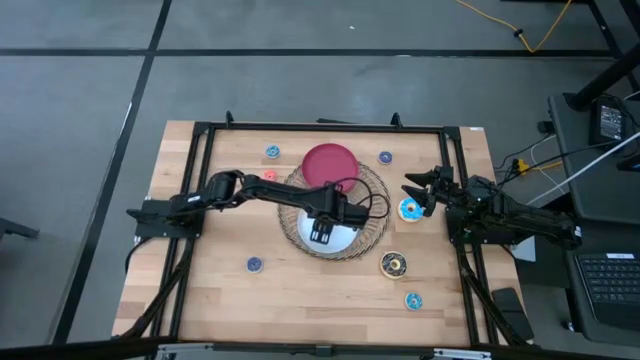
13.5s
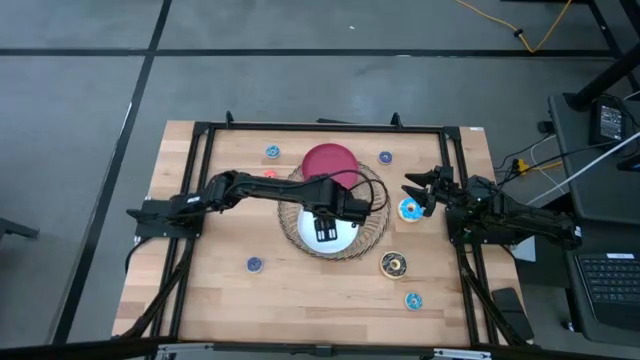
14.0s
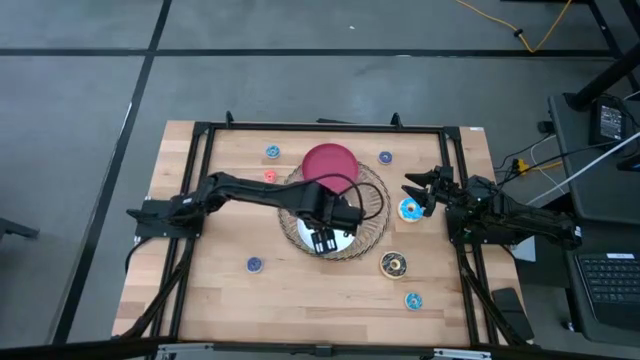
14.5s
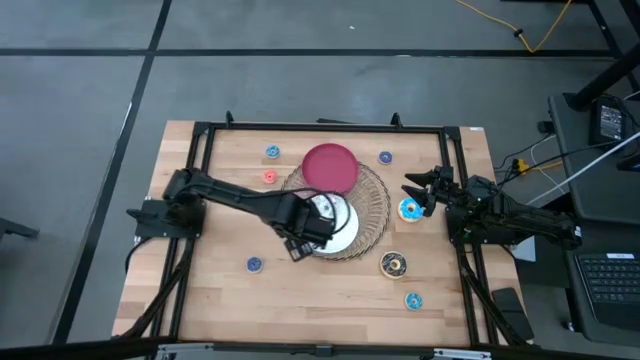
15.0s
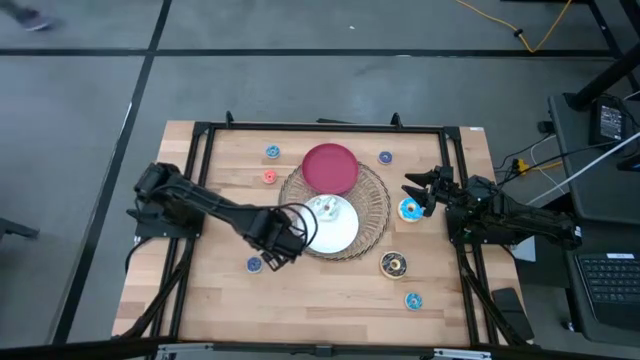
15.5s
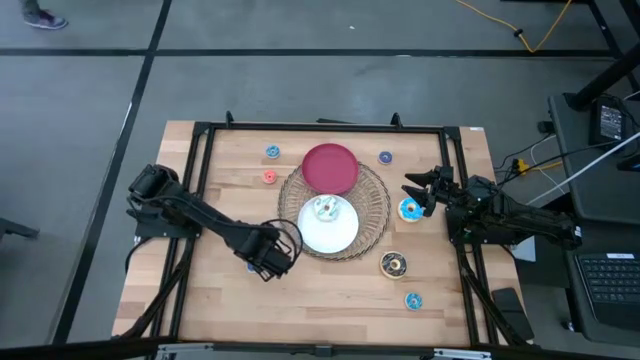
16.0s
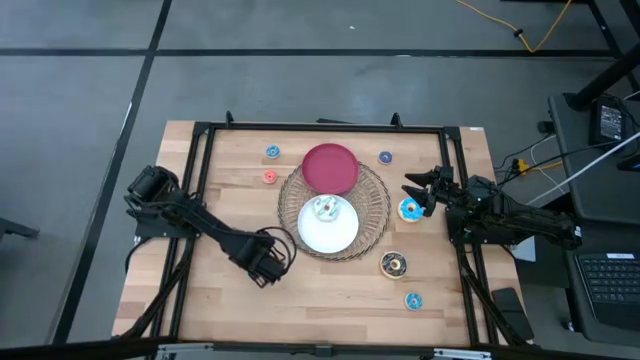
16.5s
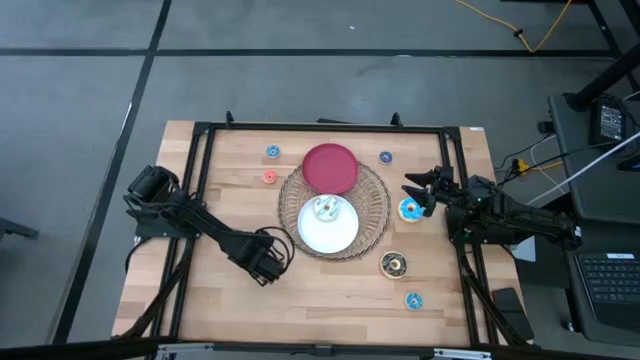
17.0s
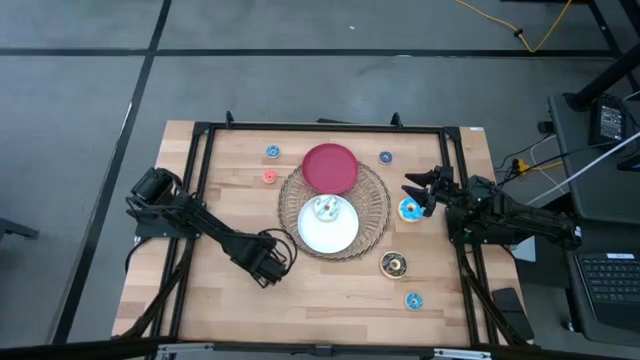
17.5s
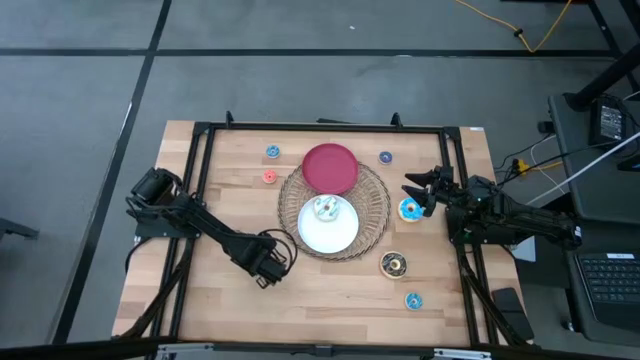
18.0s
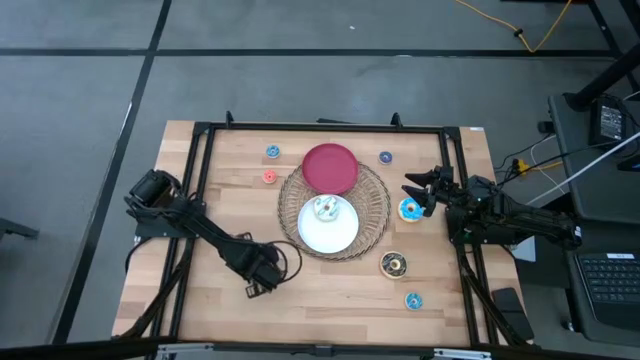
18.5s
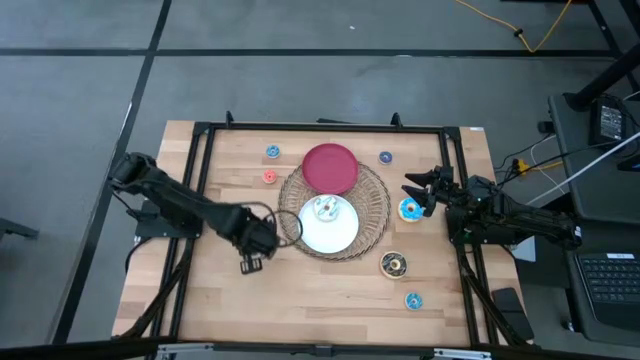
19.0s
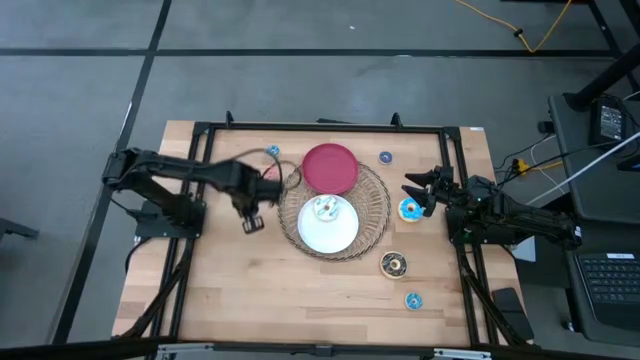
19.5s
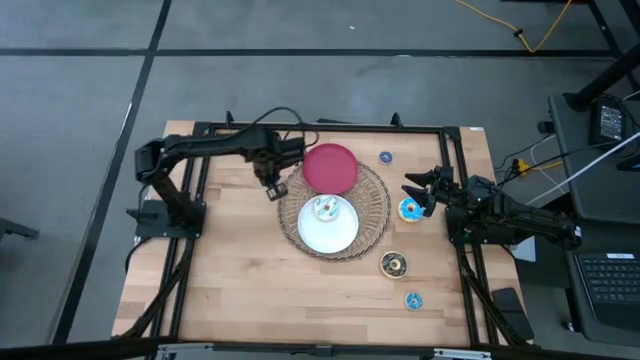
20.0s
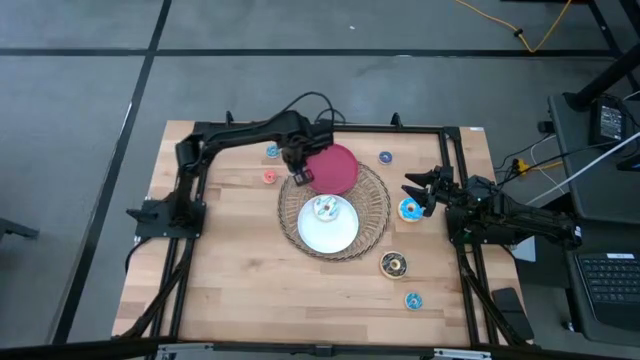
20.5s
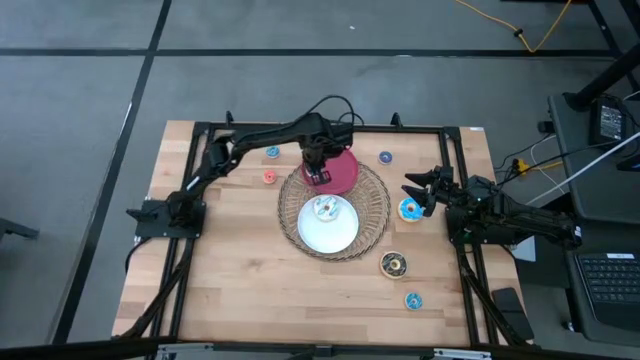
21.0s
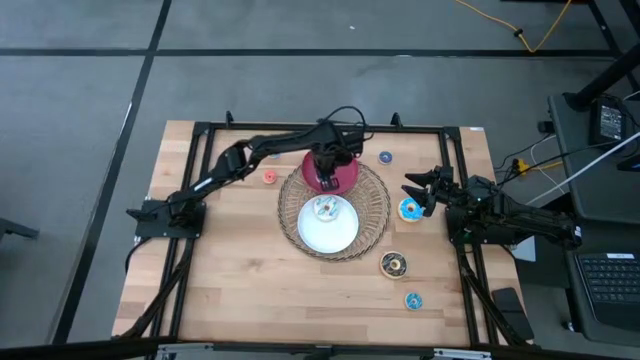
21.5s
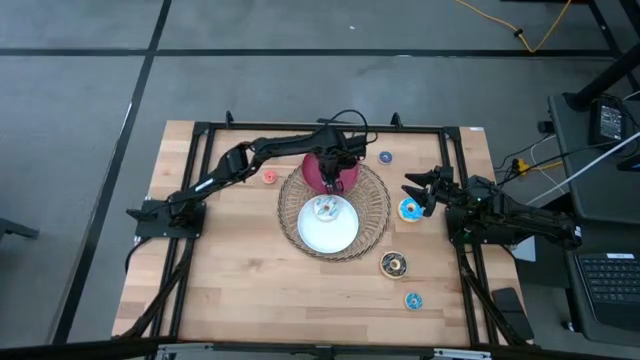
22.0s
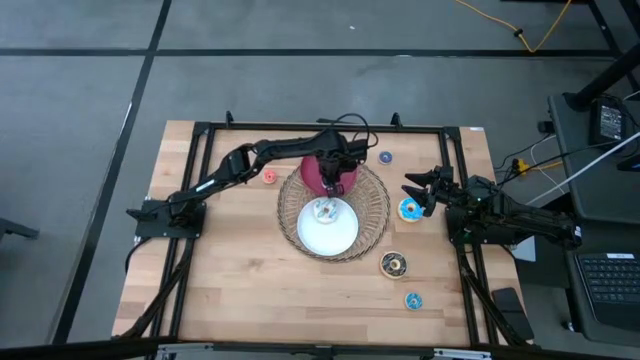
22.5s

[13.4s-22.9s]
Task: Pick & Place donuts
Put the small blue donut on the red plate

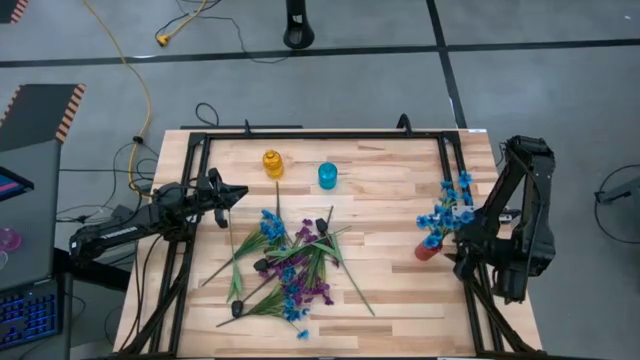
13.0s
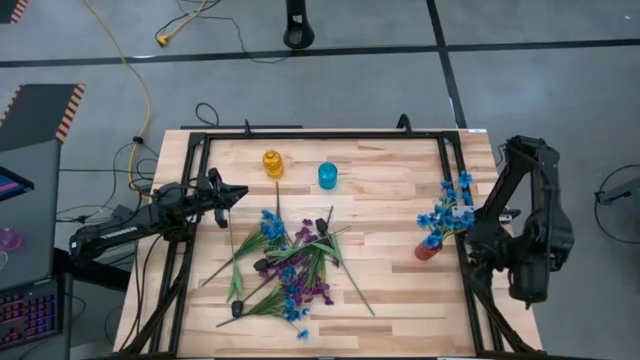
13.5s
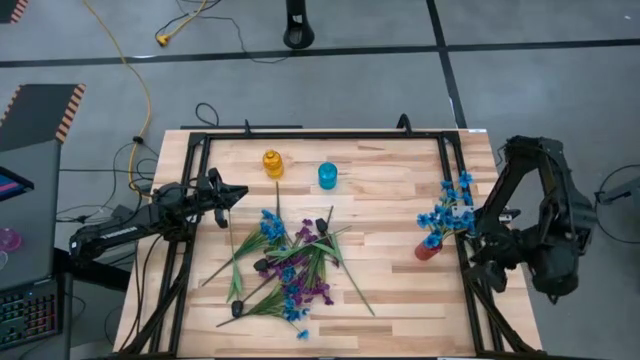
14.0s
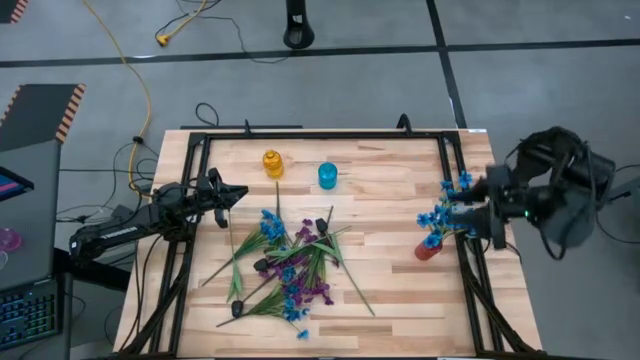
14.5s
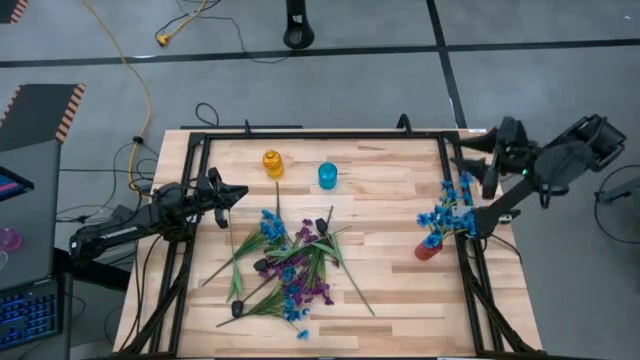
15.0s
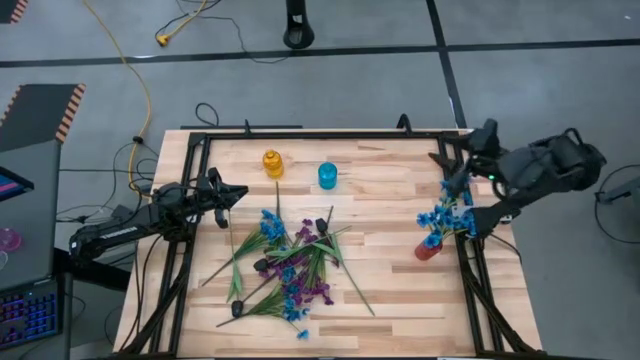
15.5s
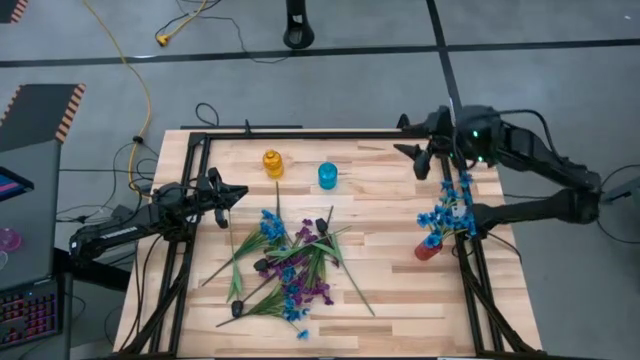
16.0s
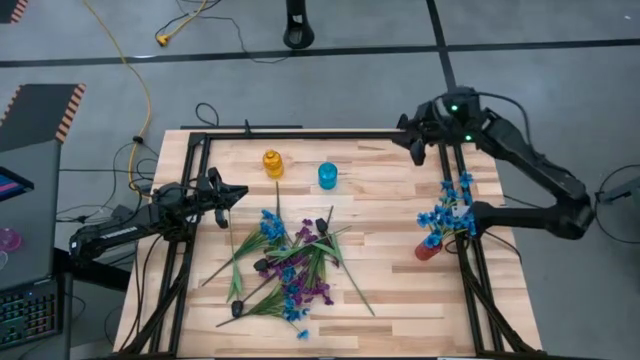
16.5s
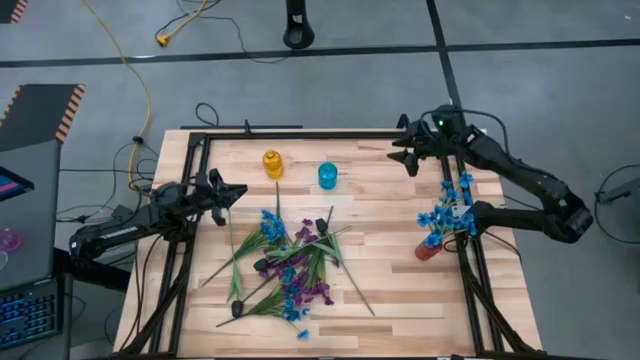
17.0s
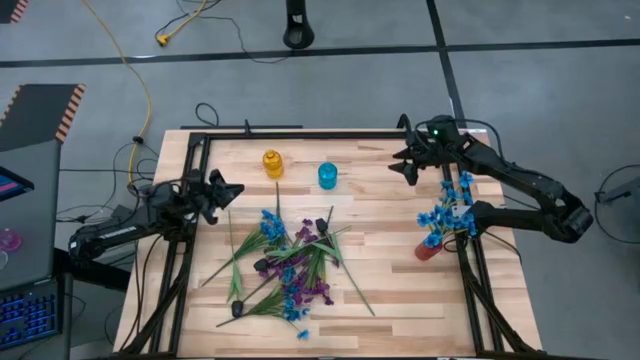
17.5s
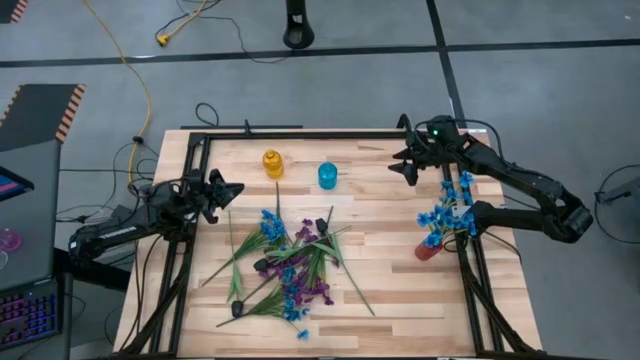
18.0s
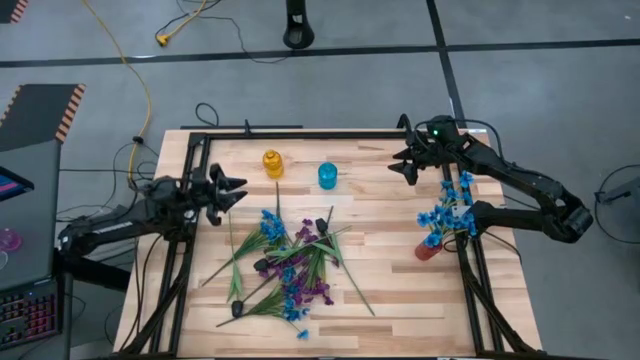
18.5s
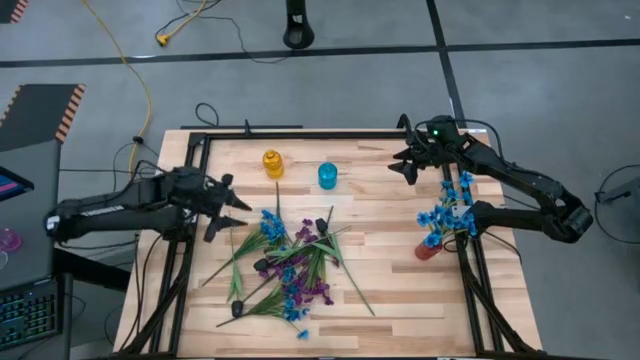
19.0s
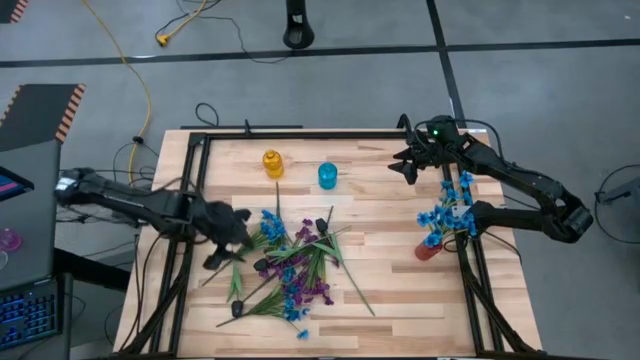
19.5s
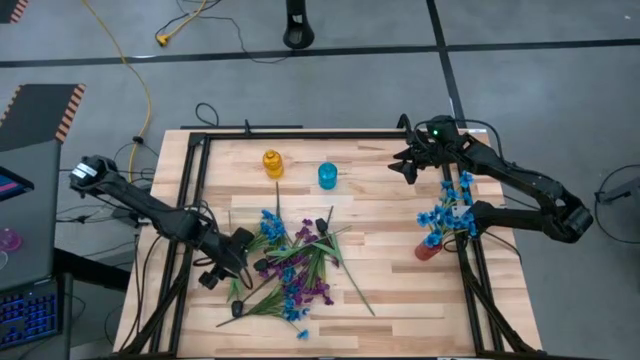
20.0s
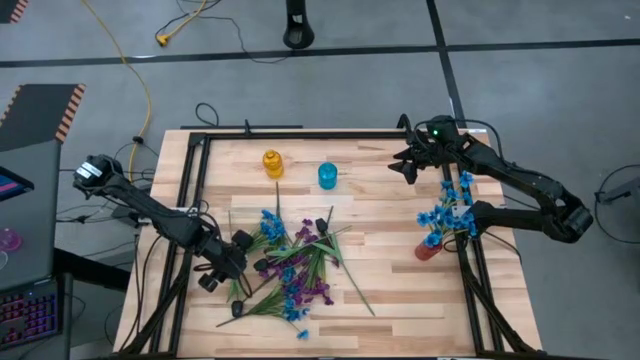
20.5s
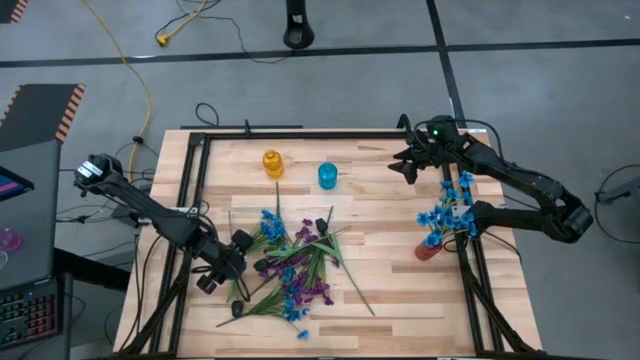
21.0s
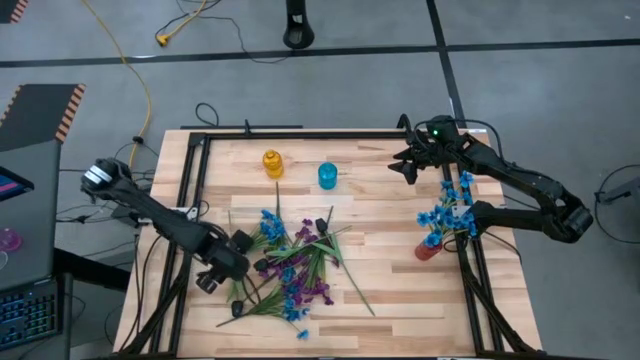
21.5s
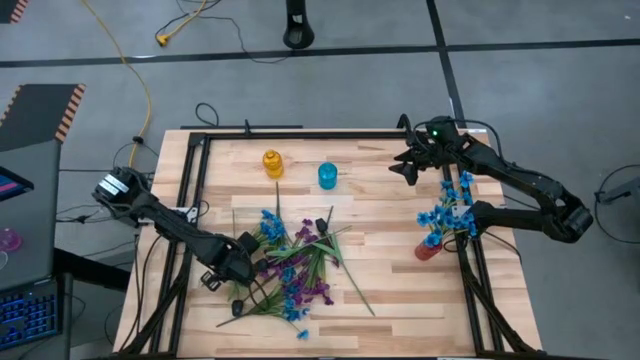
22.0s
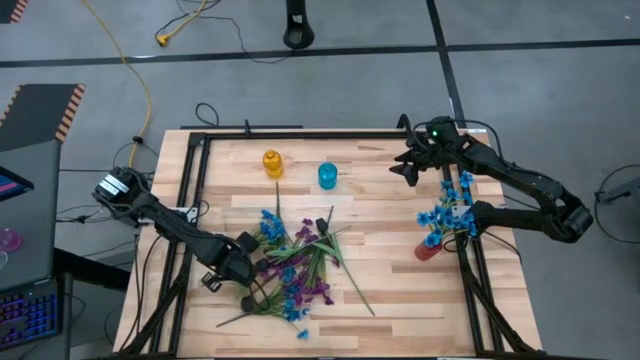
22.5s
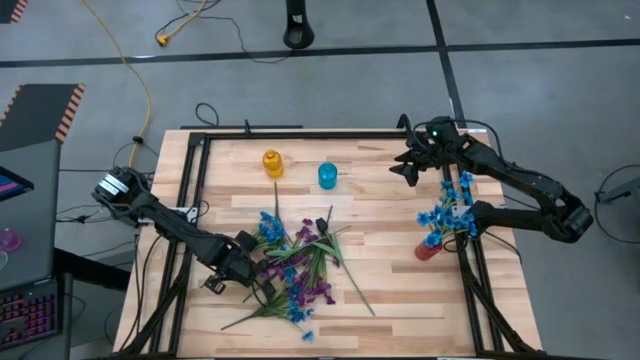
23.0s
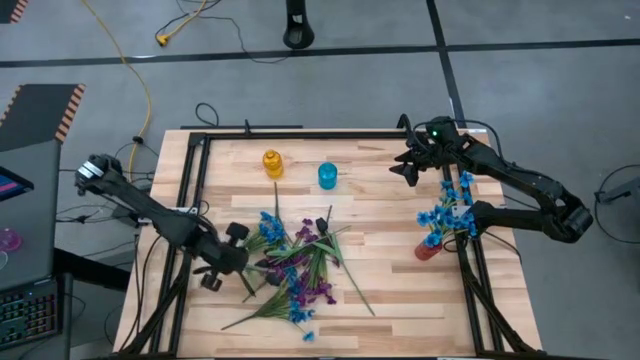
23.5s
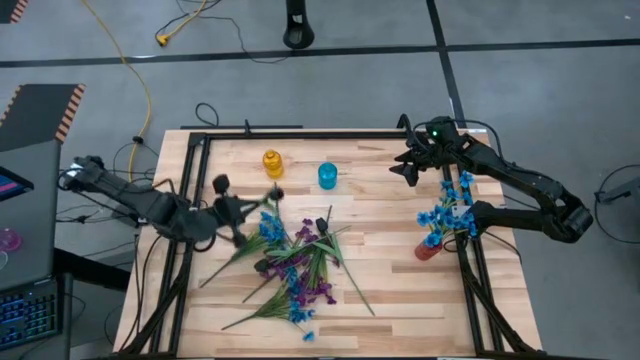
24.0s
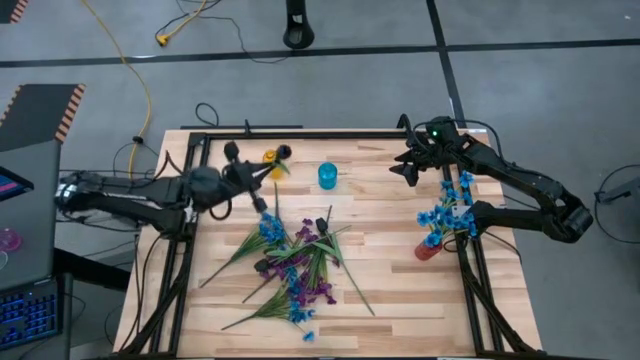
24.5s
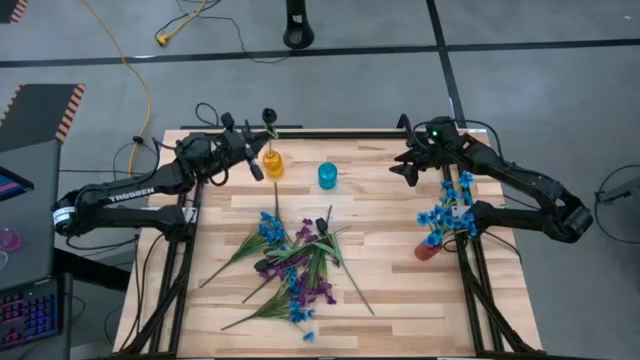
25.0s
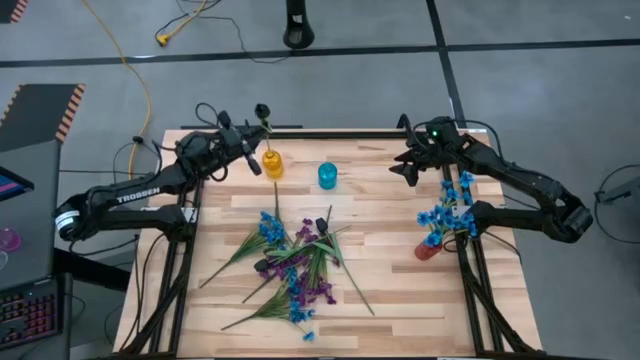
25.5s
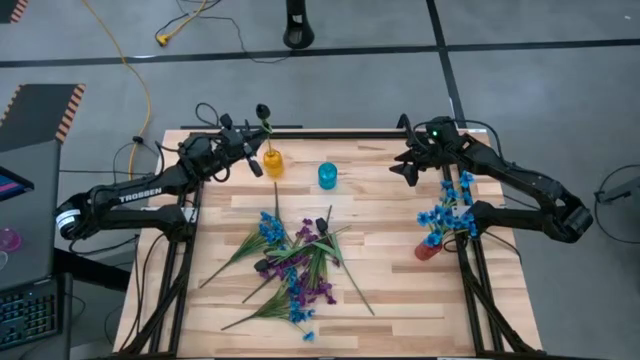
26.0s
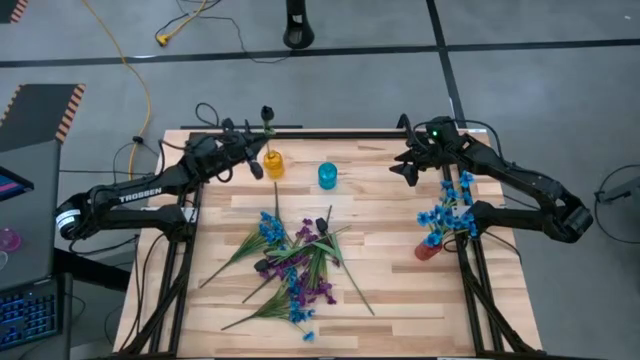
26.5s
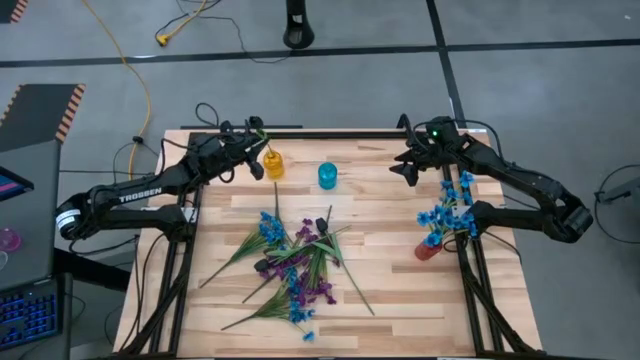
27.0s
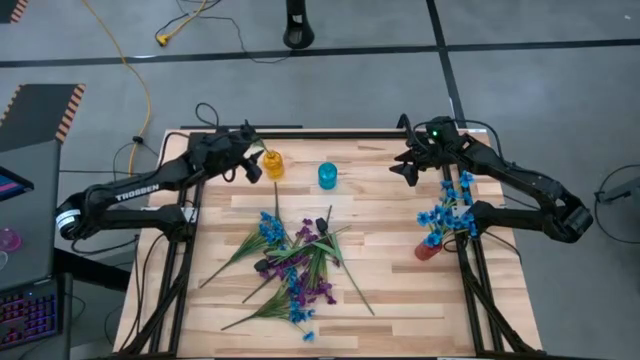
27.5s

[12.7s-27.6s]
Task: Sort flowers into vase by color
Put the left black tulip into the yellow vase
